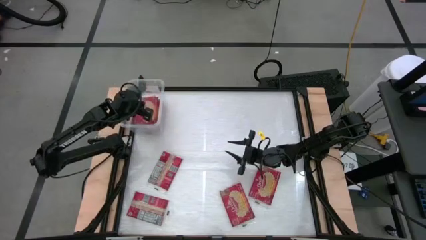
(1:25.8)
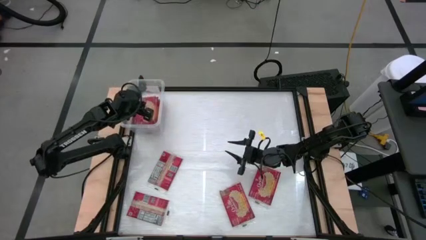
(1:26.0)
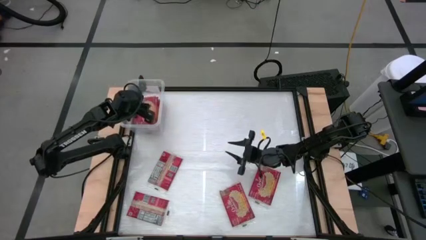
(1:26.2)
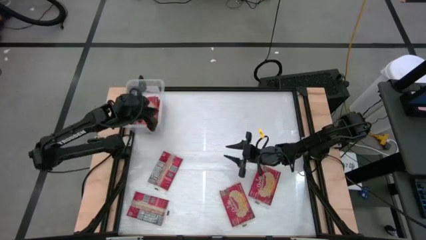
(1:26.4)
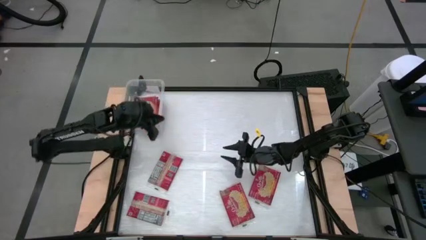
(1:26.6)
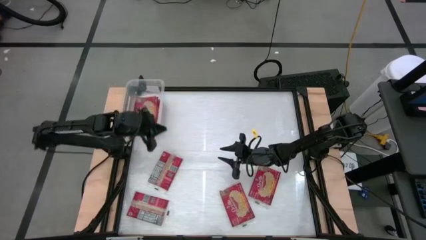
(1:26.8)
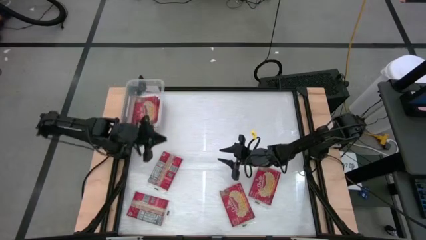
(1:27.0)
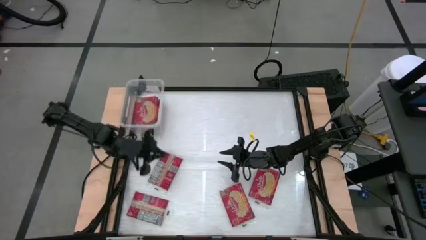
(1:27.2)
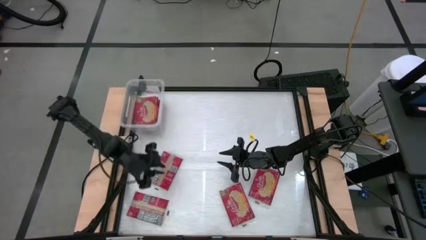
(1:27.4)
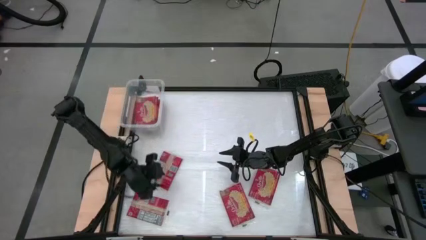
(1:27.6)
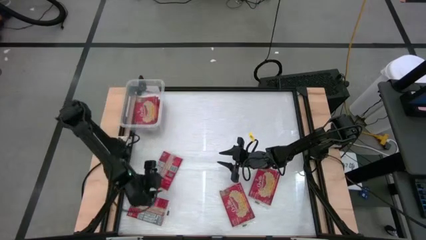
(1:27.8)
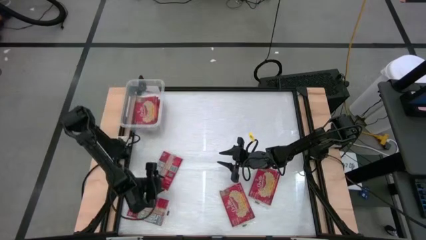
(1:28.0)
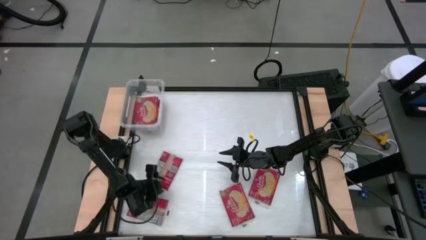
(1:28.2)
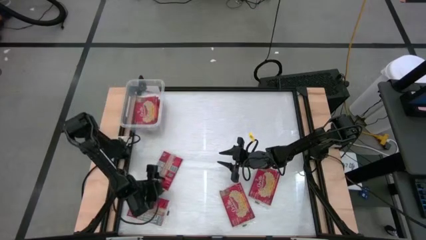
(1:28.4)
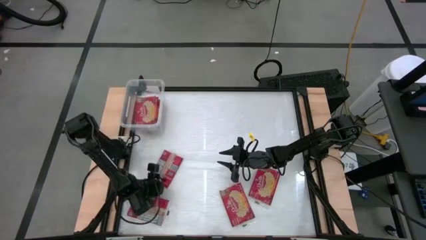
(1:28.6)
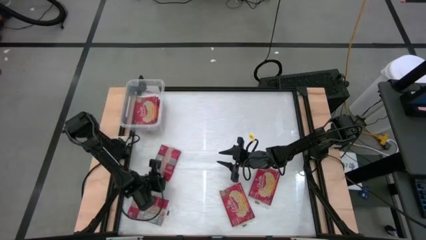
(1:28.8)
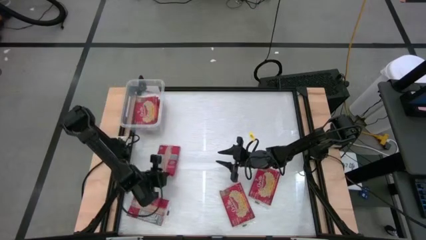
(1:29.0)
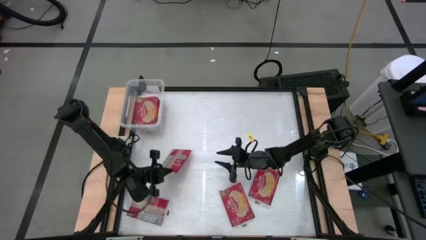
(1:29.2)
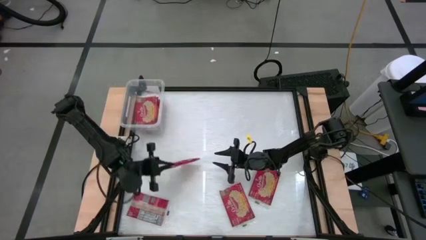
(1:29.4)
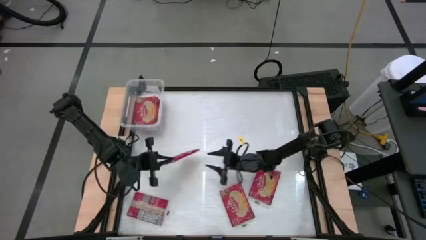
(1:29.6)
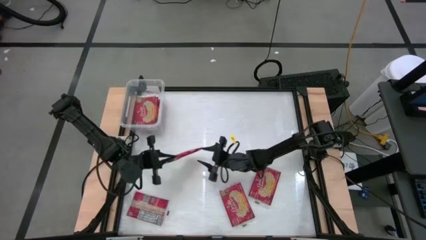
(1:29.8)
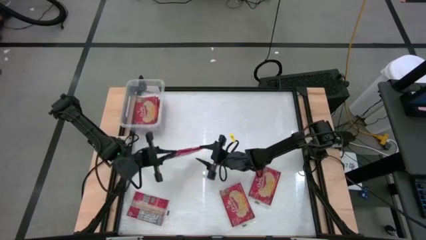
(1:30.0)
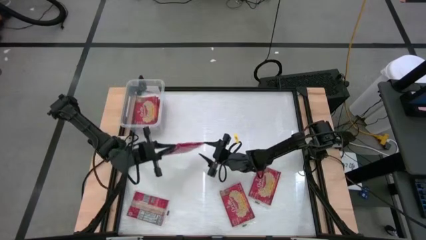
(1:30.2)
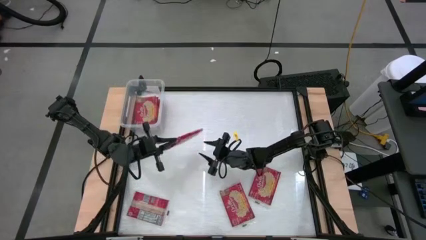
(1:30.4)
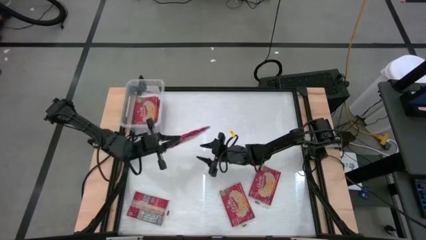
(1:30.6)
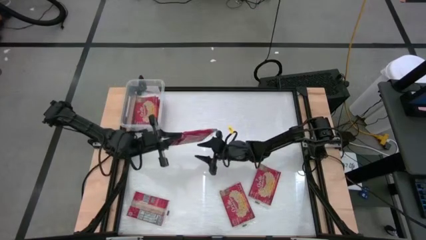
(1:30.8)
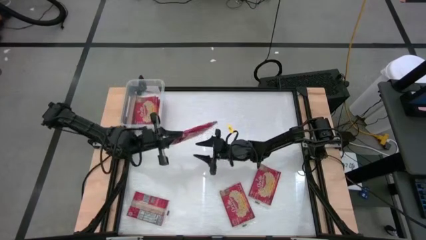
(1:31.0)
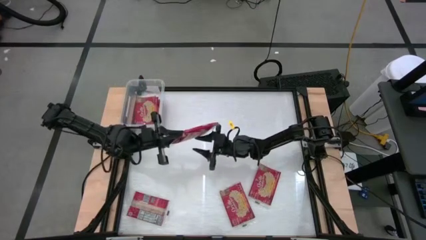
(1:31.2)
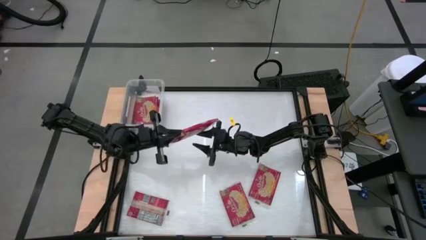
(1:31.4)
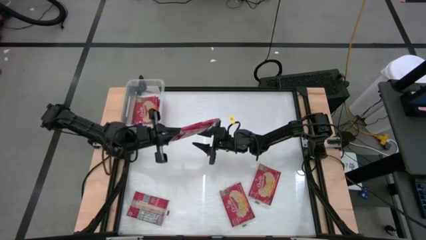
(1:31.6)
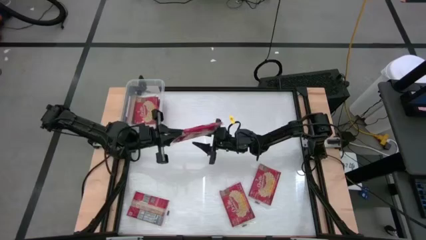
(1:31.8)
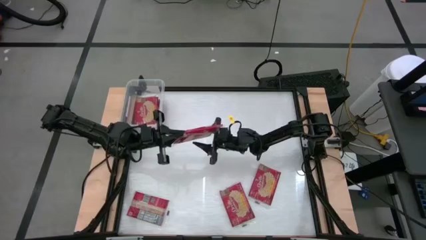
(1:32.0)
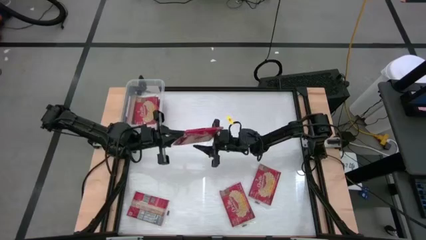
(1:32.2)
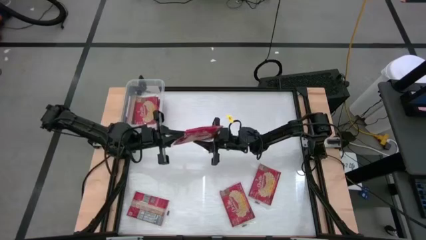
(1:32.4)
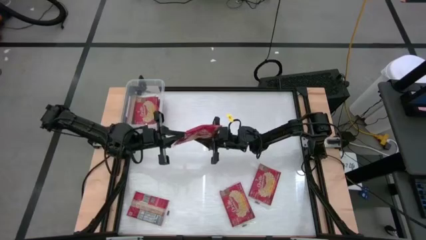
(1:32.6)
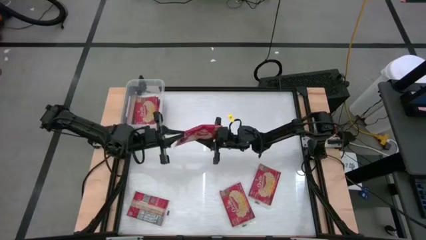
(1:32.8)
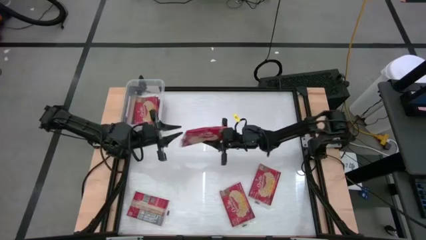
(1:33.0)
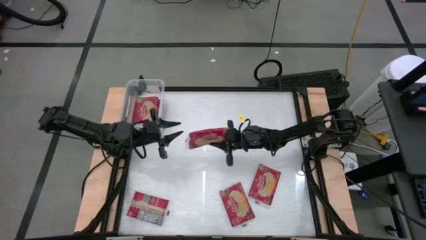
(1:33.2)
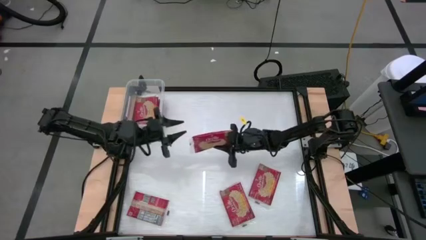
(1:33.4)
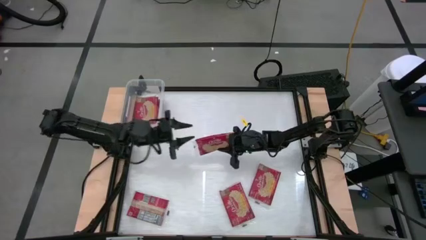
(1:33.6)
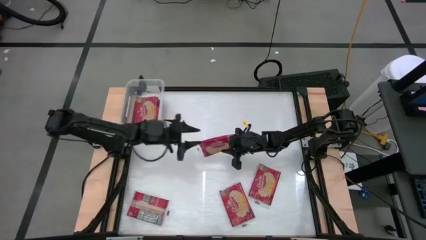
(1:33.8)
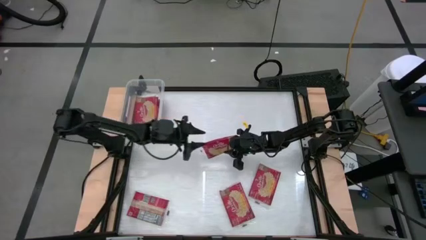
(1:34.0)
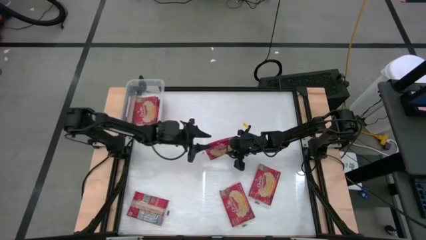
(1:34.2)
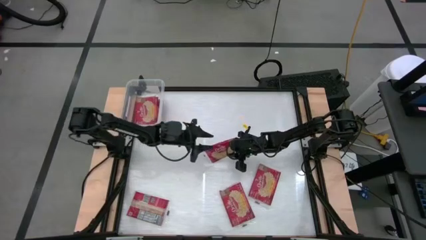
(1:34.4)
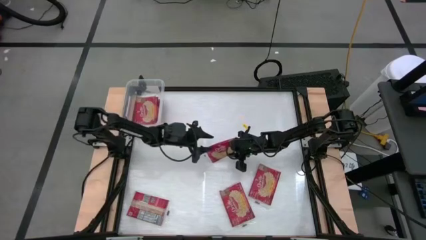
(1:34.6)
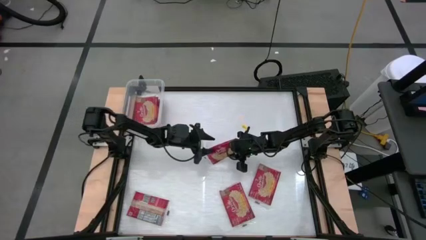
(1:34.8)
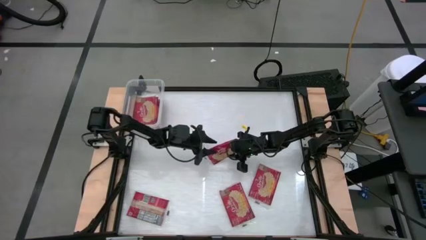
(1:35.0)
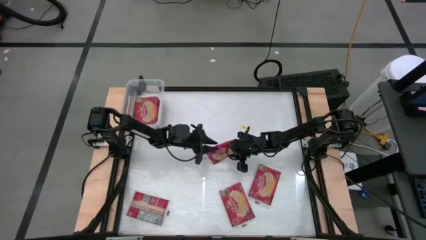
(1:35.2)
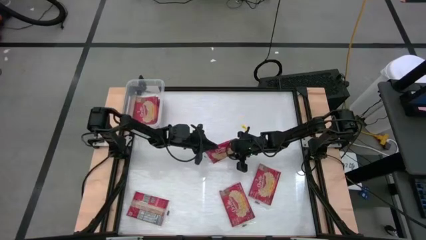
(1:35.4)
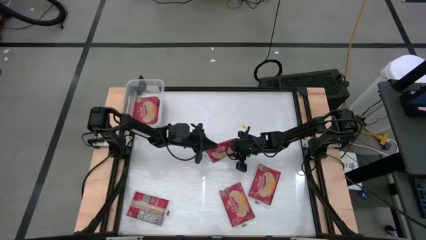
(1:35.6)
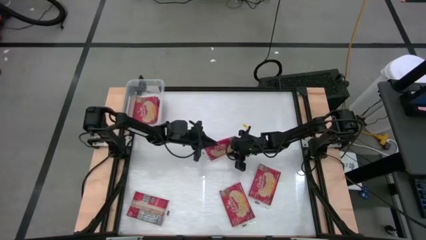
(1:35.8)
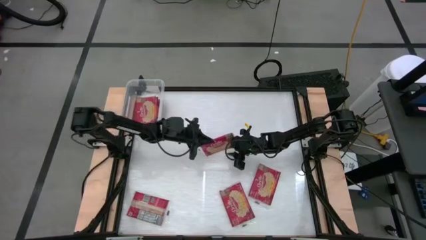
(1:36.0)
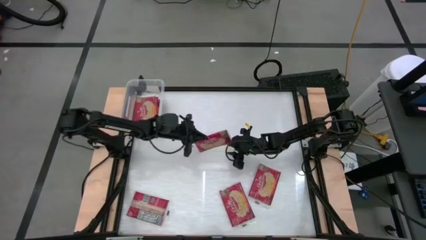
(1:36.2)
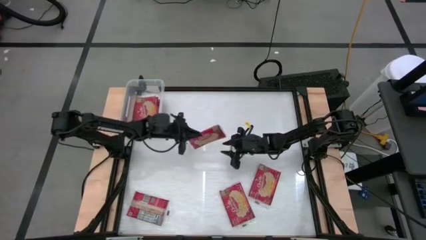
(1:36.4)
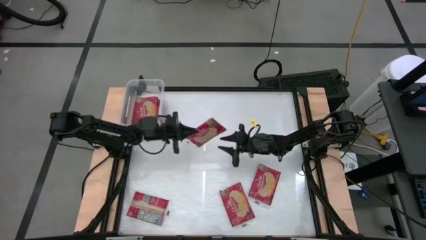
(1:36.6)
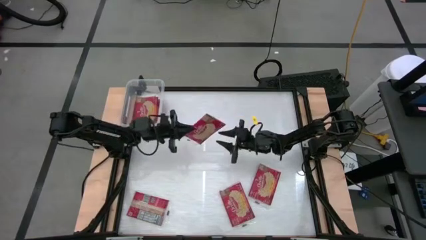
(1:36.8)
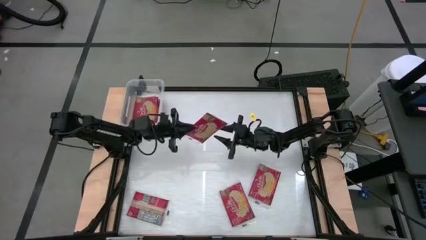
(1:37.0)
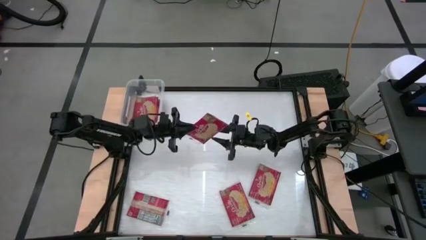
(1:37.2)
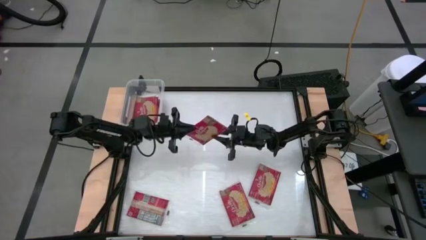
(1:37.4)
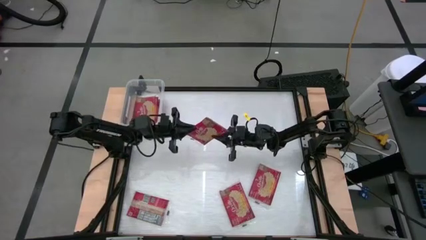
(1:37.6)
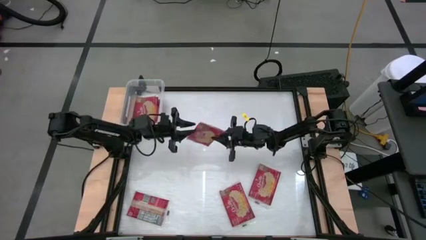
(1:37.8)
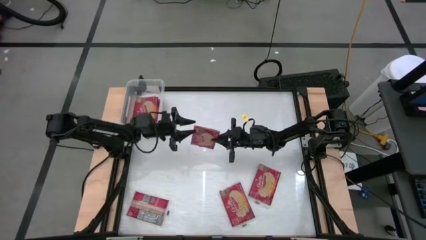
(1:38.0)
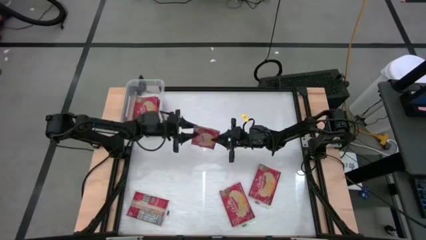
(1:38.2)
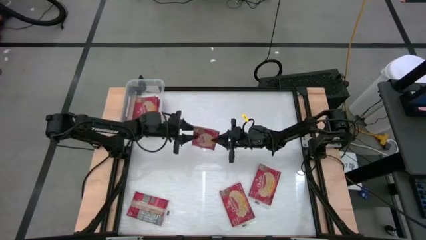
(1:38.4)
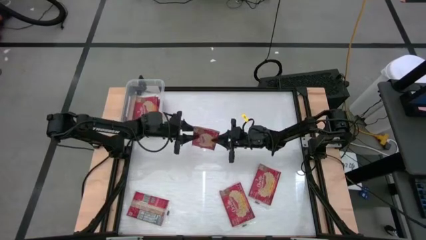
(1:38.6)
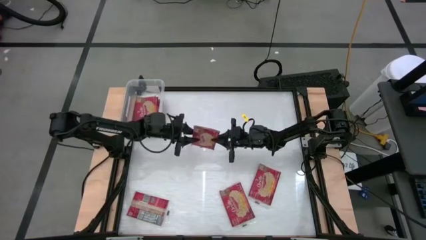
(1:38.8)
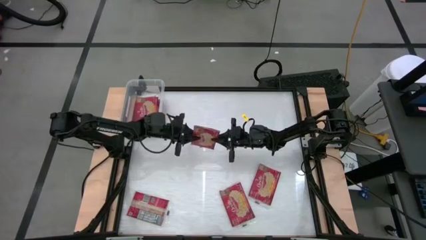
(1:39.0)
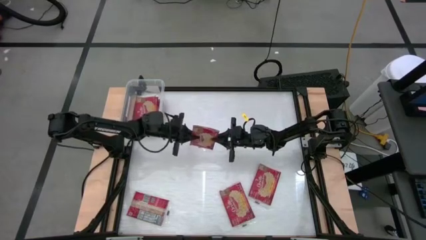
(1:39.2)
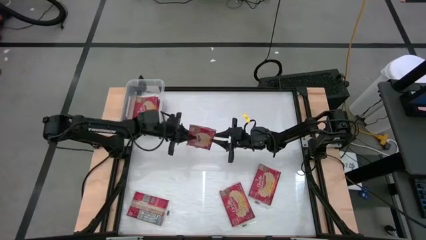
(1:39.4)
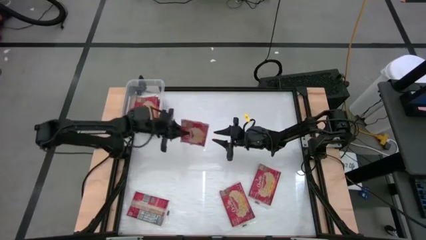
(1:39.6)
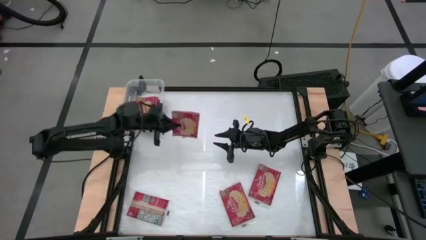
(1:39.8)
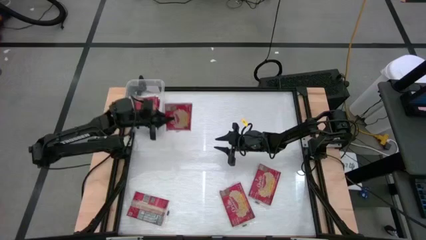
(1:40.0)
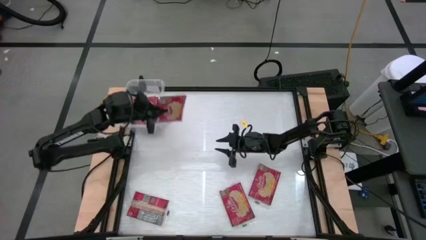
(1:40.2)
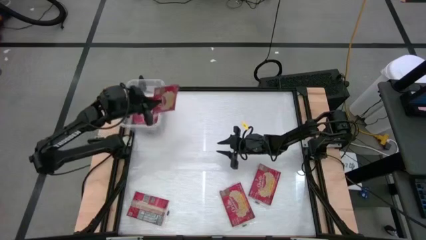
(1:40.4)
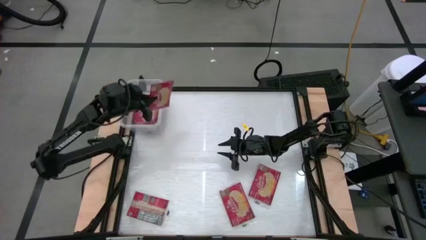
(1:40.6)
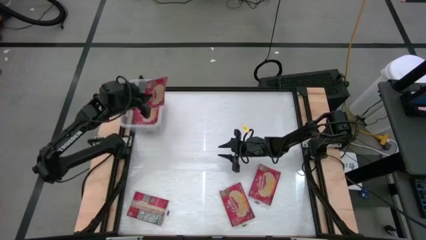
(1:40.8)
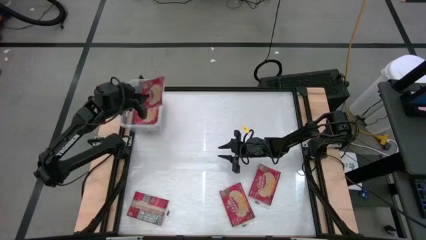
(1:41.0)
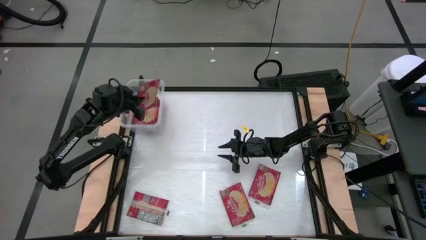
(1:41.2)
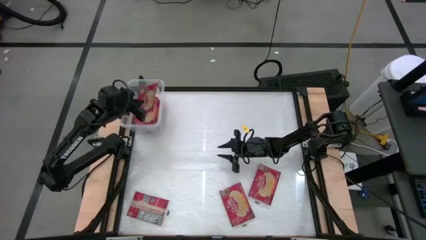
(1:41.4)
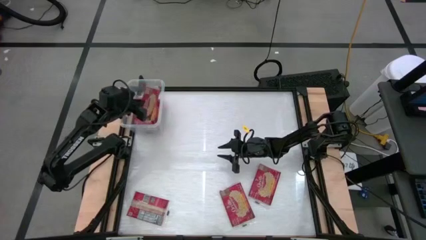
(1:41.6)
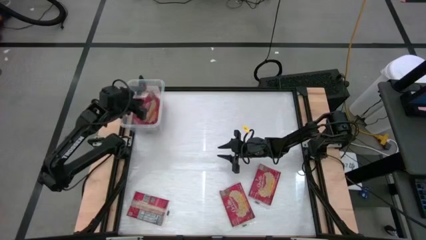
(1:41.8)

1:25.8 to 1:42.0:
Task: Sort popcorn bags into baskets
Stack the red popcorn pack into the bin

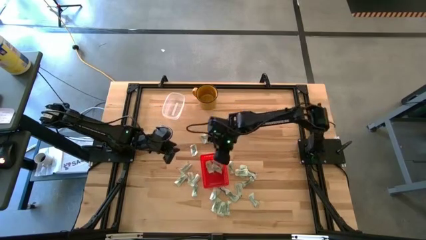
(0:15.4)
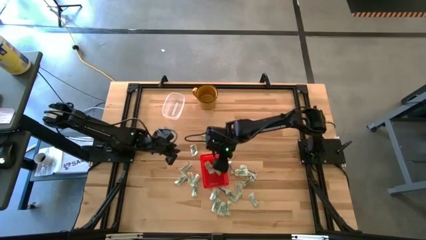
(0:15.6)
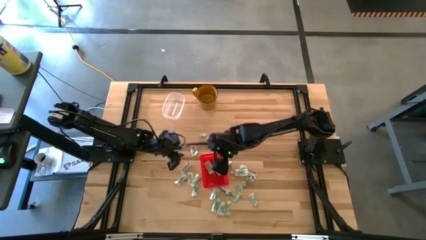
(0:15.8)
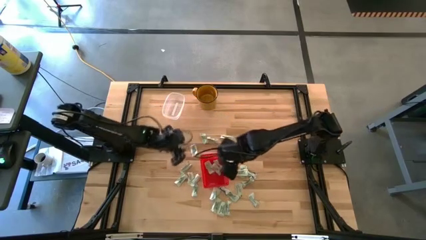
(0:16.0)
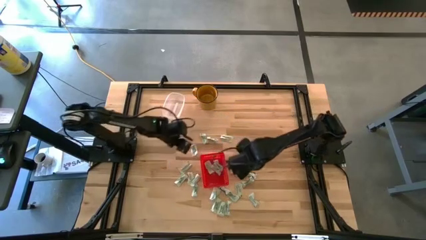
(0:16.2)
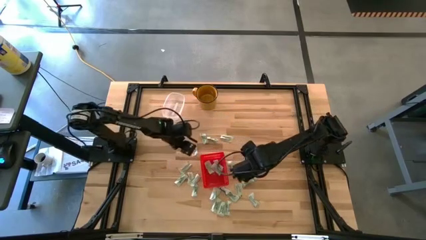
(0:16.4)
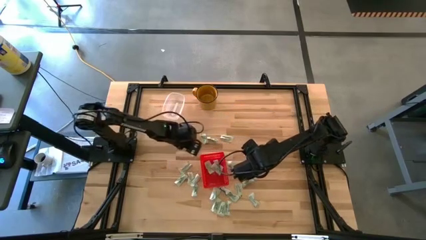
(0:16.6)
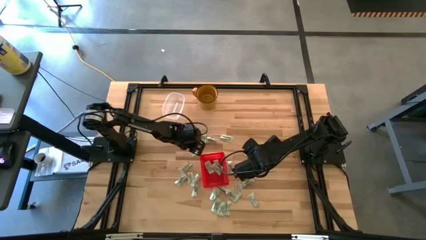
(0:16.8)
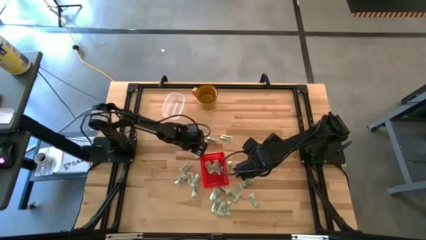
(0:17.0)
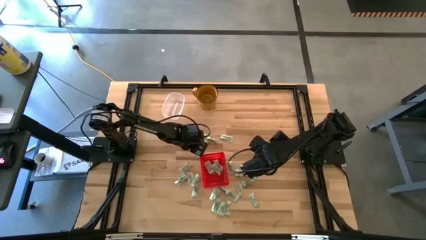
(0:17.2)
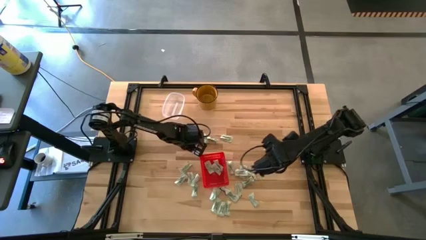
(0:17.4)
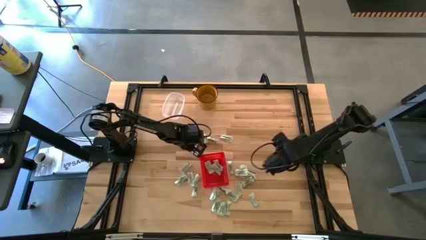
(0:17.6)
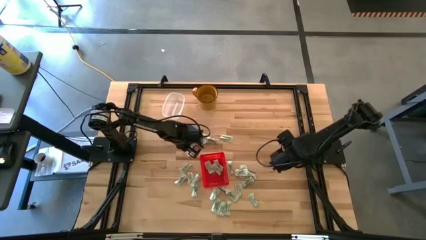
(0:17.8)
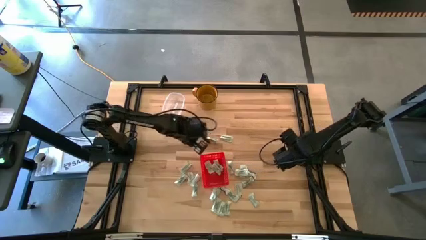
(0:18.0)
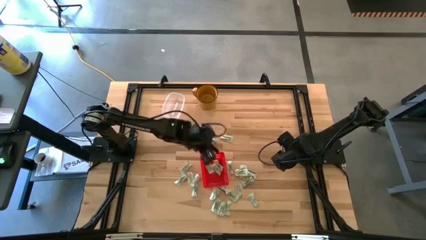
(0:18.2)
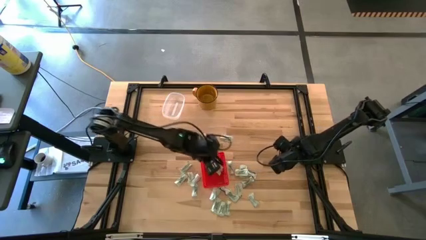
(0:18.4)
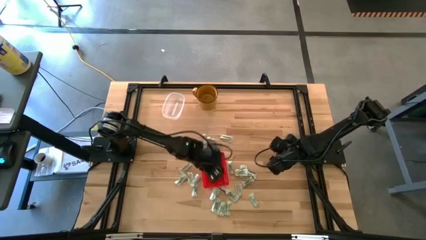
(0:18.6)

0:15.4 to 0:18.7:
Task: Pick and place Stevia / Truvia into bins
Put the white stevia packet into the red basket
